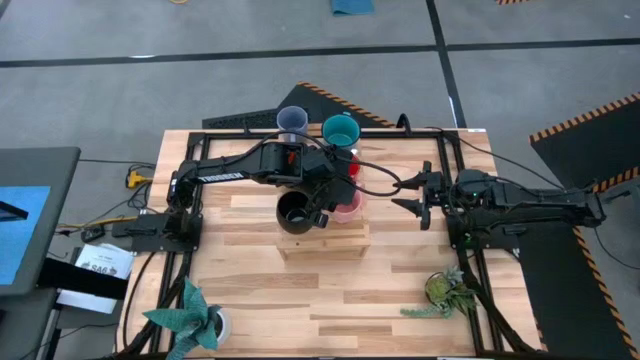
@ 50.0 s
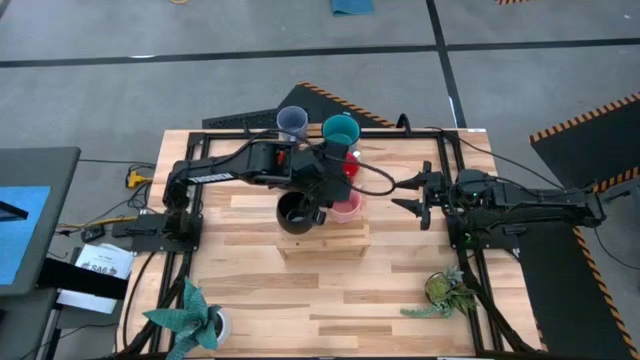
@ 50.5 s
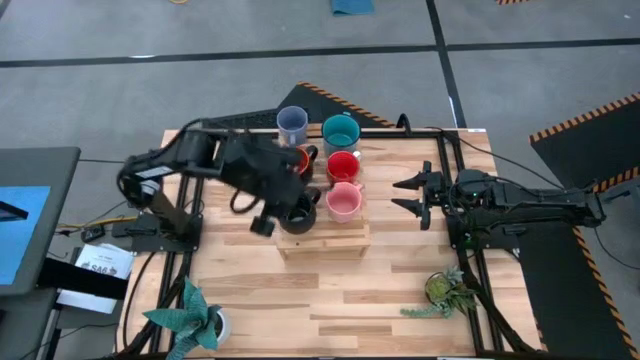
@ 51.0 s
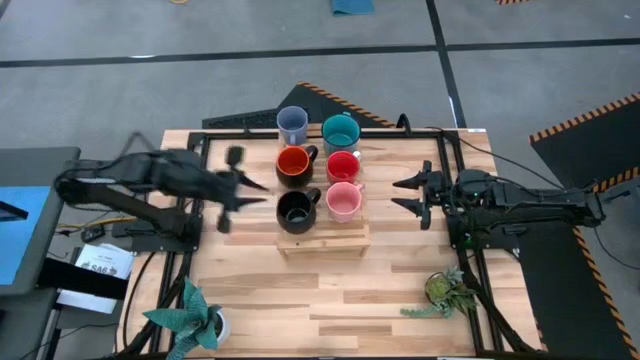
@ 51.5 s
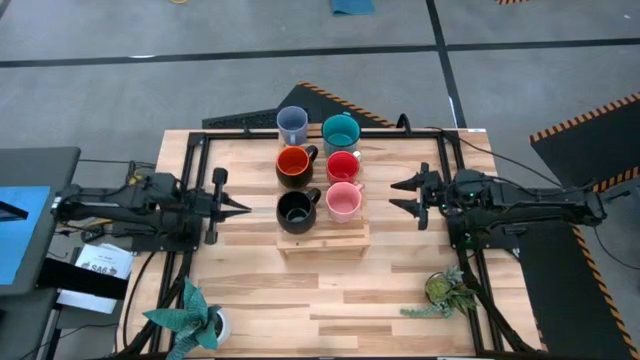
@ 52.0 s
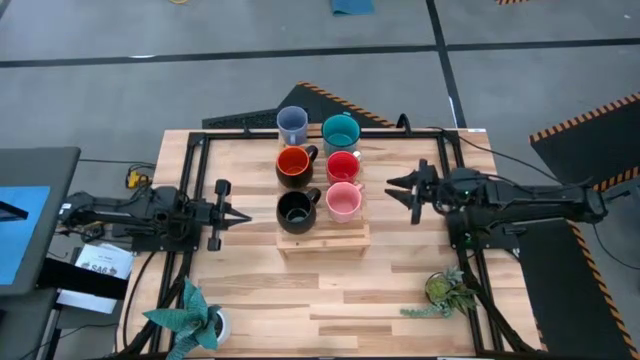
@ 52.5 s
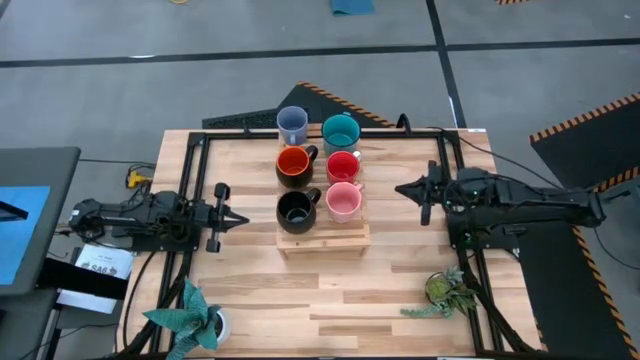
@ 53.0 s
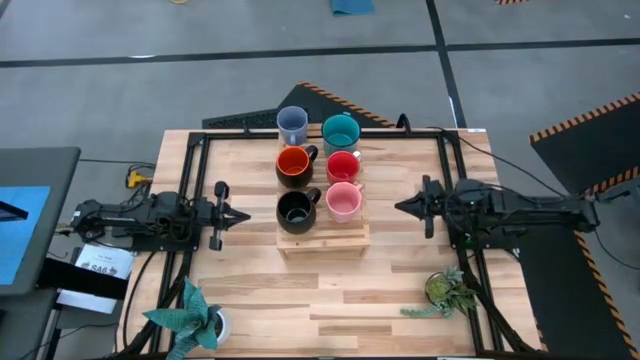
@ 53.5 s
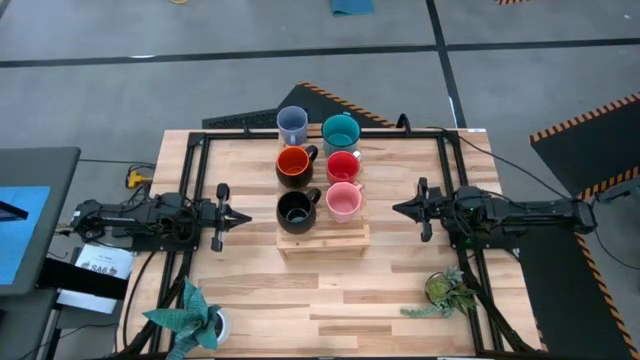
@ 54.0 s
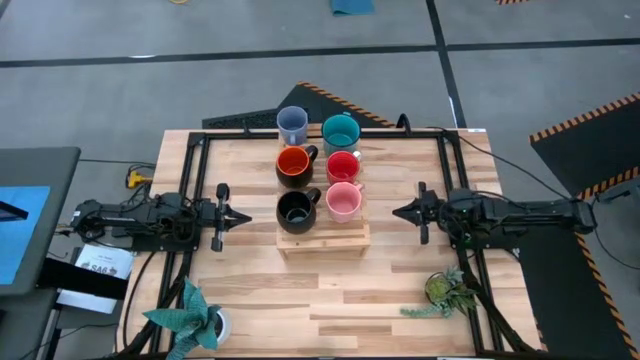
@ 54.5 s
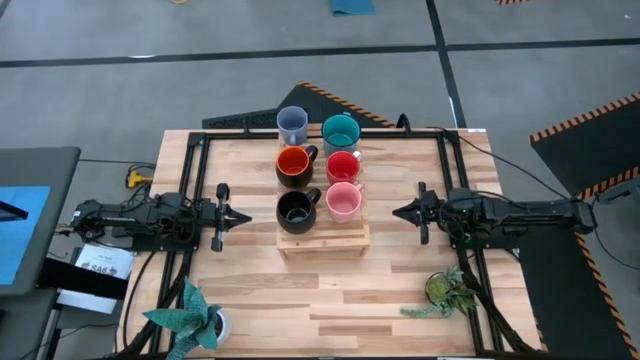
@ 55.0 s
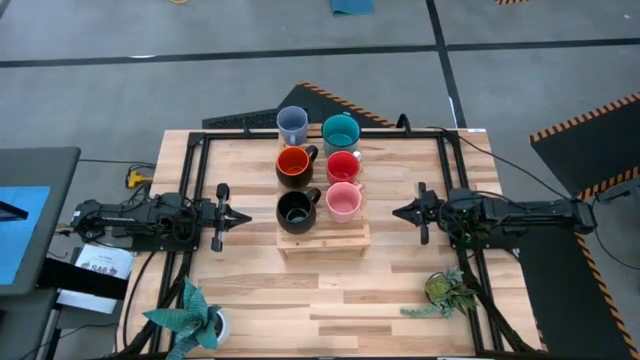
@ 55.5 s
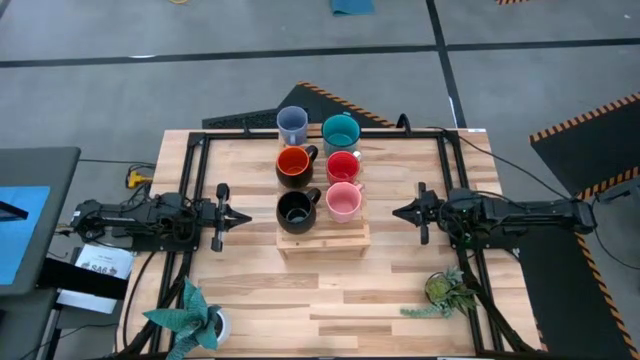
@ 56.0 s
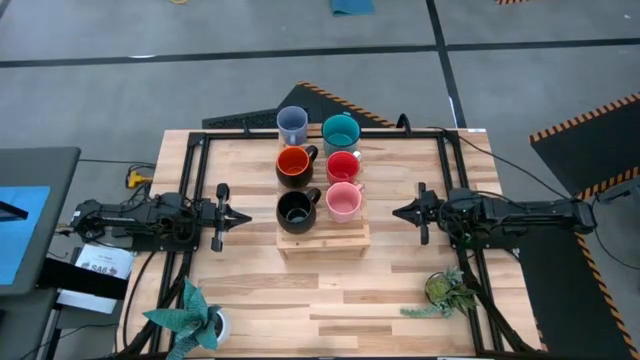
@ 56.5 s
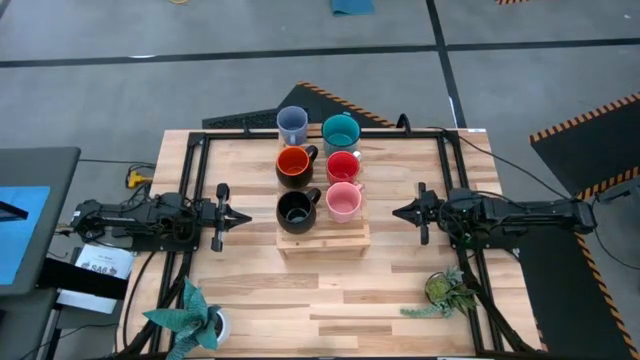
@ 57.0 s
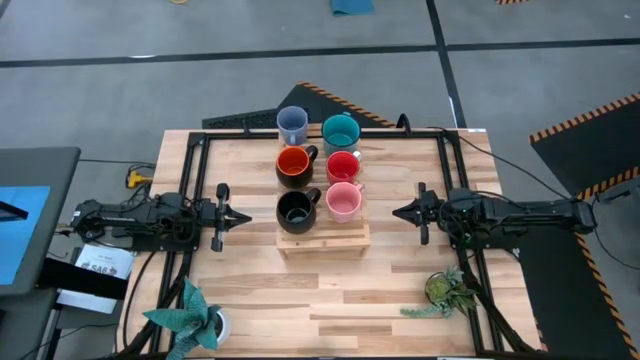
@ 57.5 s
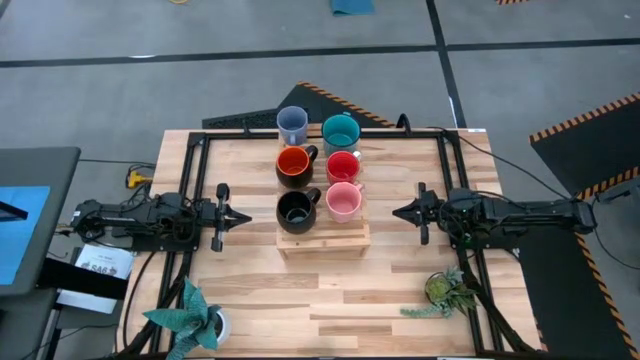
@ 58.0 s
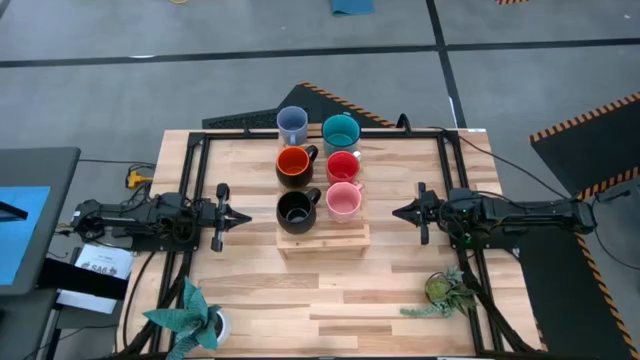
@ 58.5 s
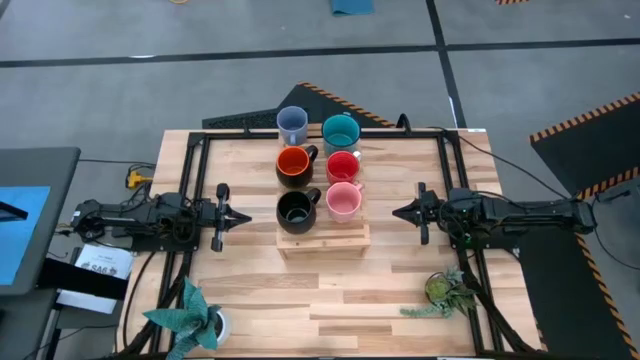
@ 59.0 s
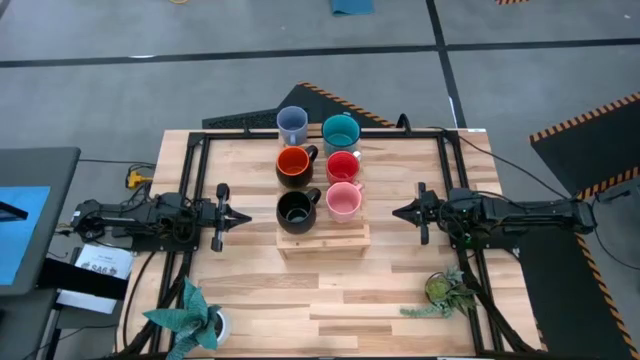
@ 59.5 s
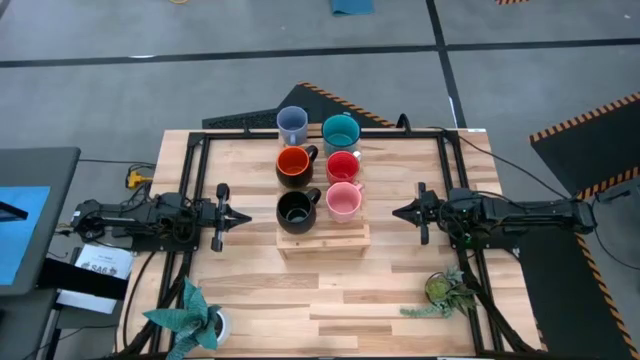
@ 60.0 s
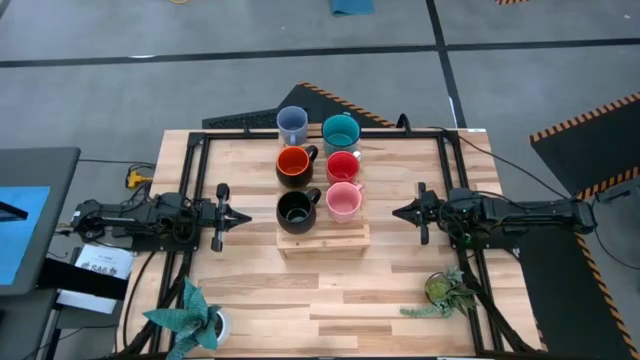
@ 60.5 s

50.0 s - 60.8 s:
Task: Place coffee mugs
Return to Home Position

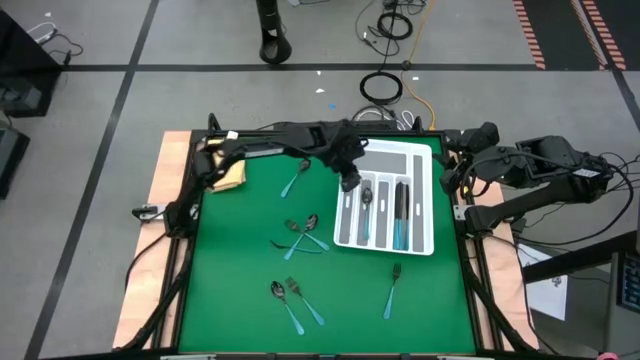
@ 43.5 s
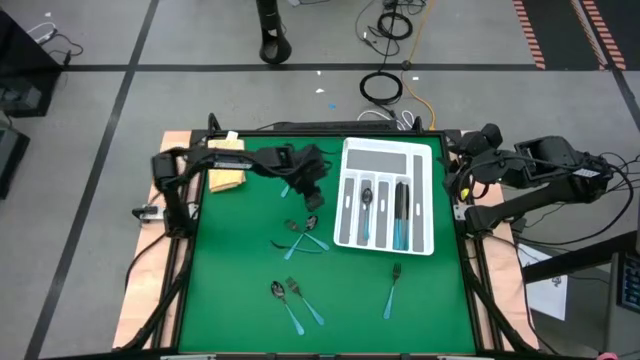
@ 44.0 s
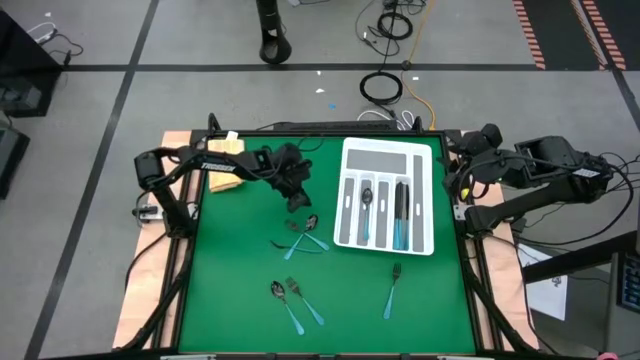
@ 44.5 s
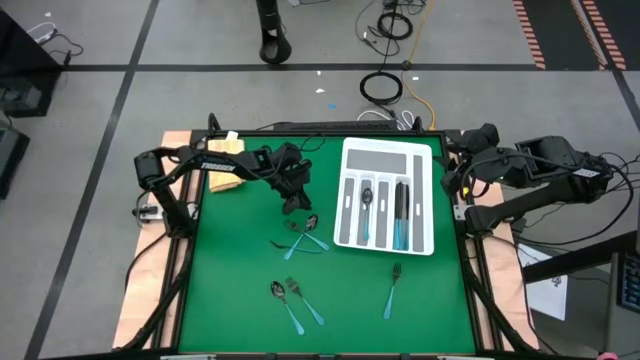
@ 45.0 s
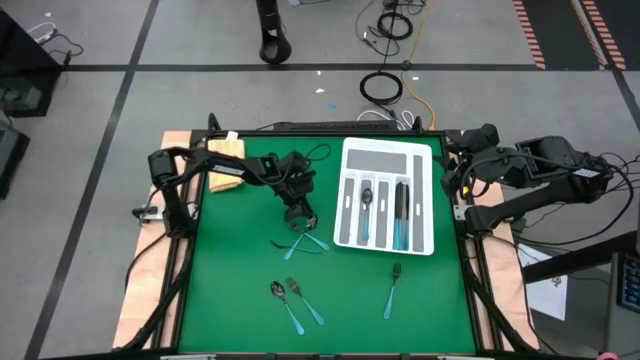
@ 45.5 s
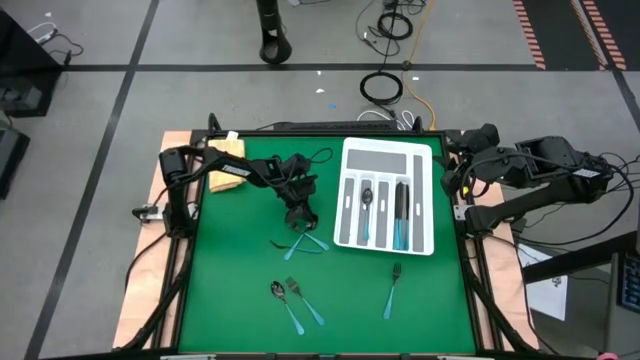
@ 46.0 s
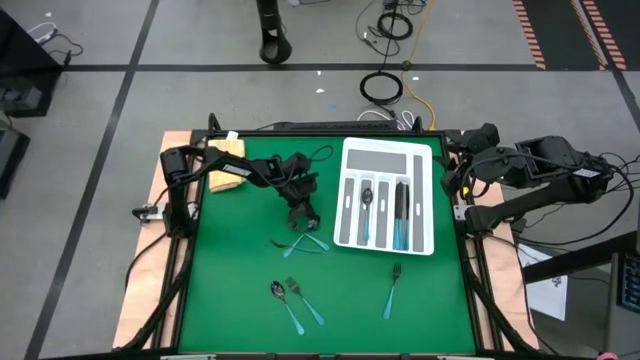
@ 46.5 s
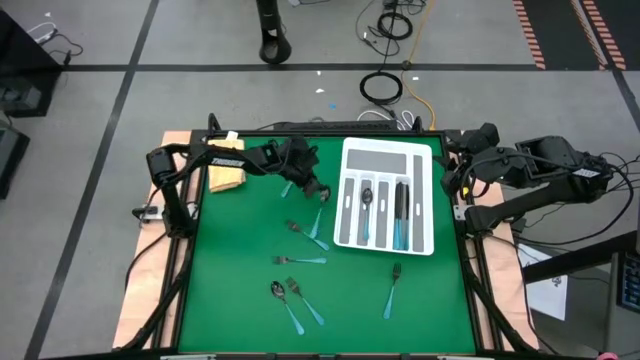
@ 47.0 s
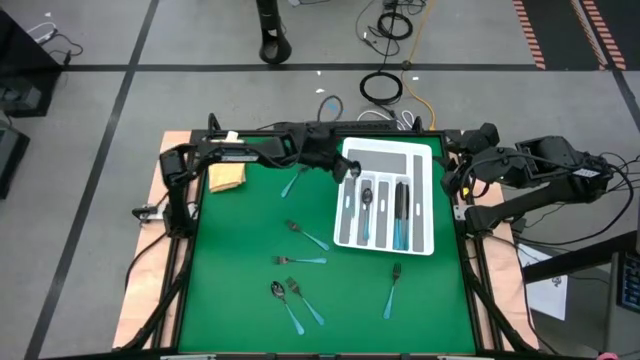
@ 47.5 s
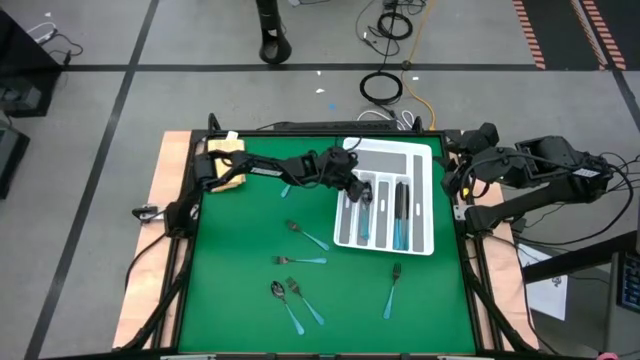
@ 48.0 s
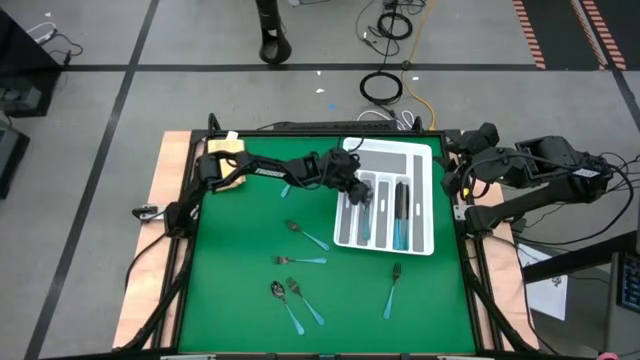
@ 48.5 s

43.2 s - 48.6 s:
Task: Sort silverware
Put the blue spoon into the silverware tray with the other blue spoon

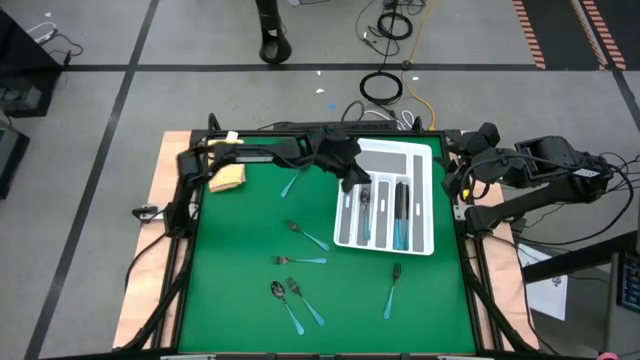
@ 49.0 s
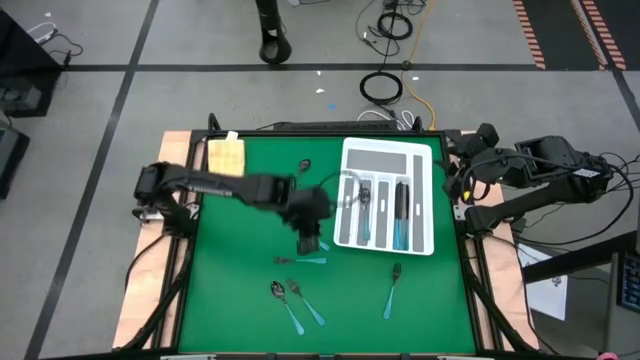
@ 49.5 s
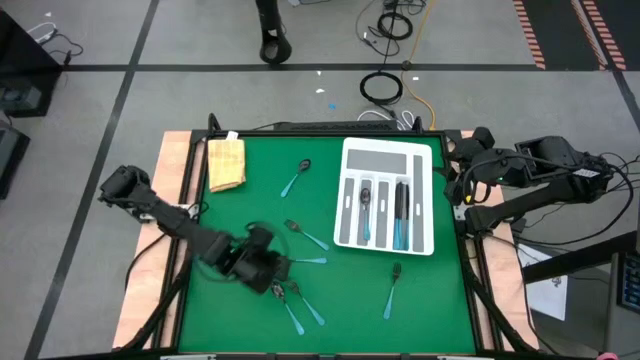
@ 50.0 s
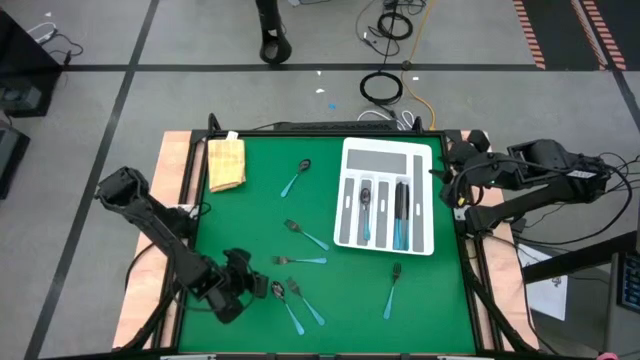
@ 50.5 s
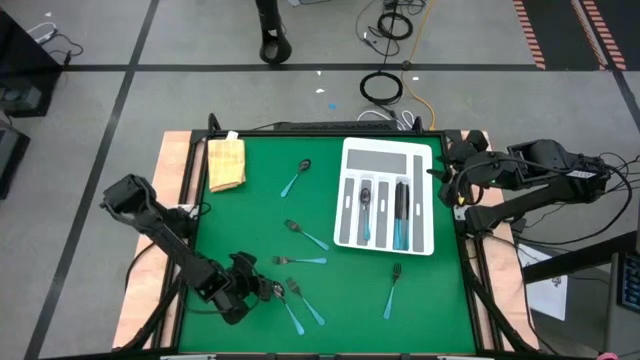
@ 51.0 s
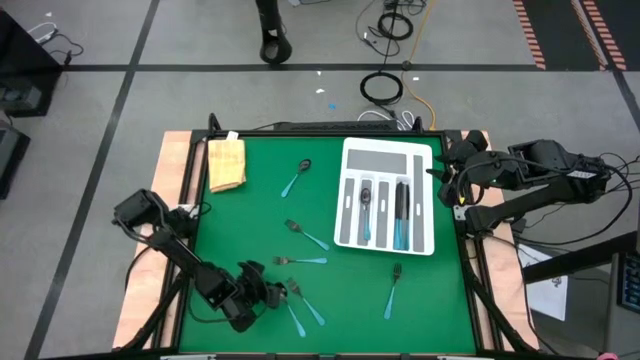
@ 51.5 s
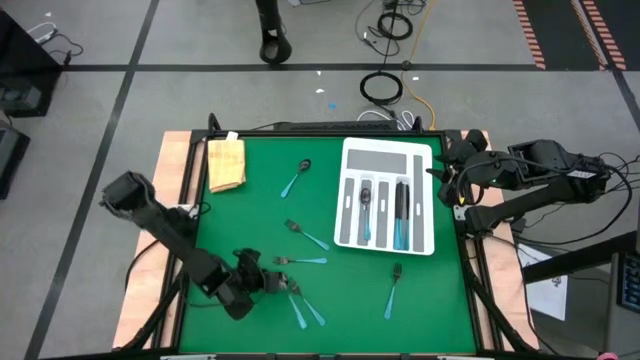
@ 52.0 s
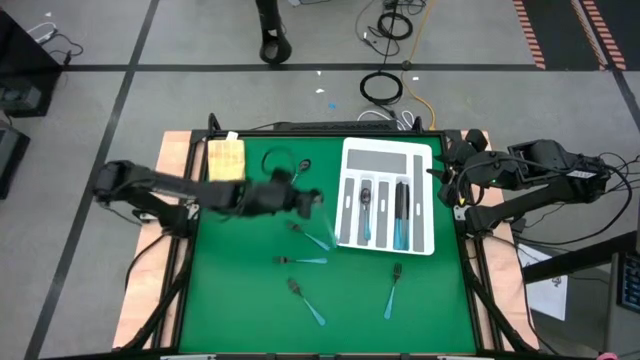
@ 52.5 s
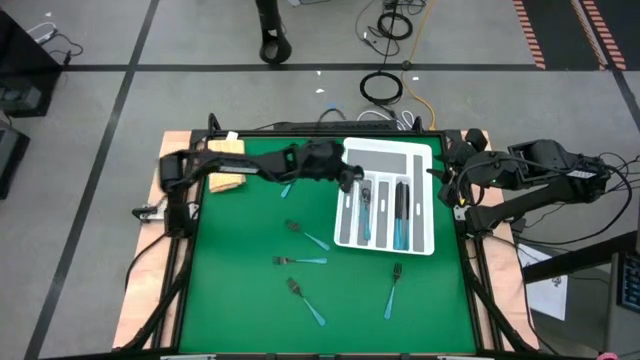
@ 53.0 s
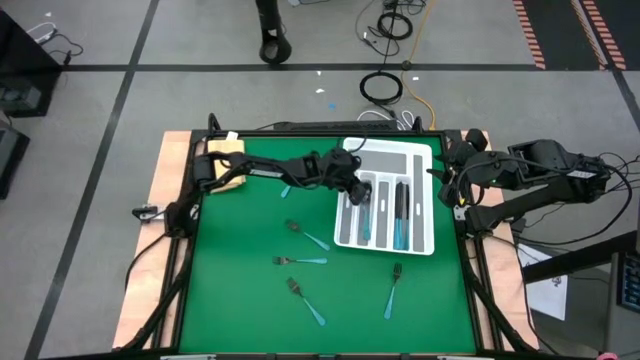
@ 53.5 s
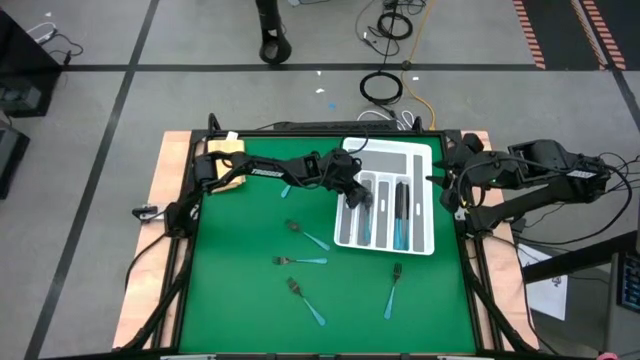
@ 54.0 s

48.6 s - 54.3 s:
Put the blue spoon into the silverware tray with the other blue spoons
